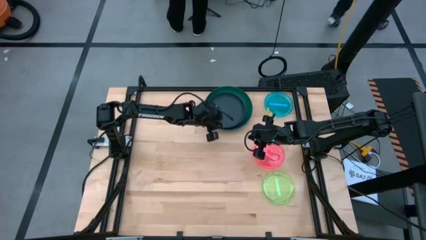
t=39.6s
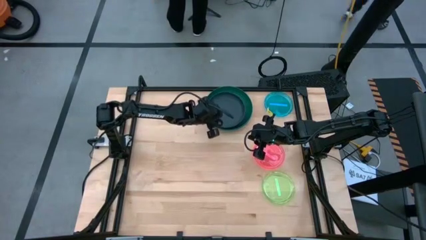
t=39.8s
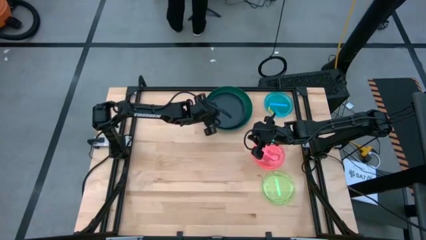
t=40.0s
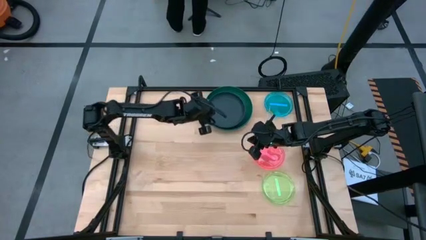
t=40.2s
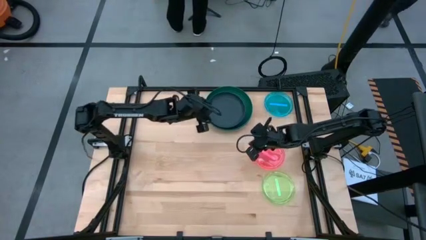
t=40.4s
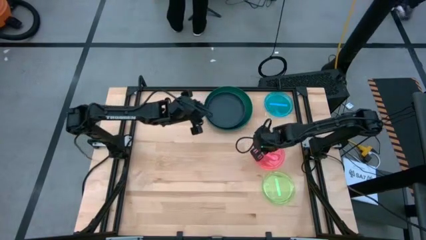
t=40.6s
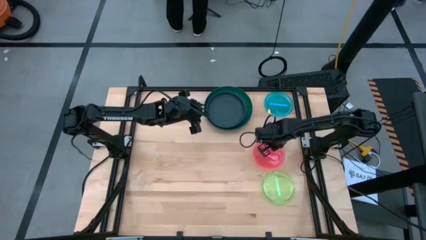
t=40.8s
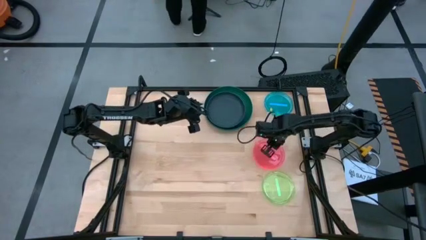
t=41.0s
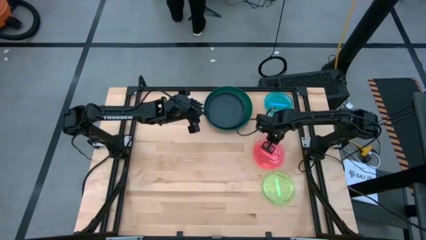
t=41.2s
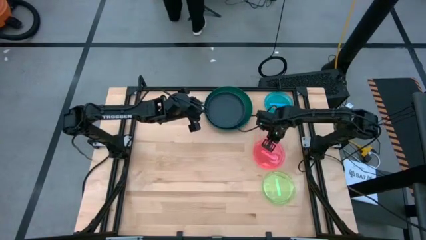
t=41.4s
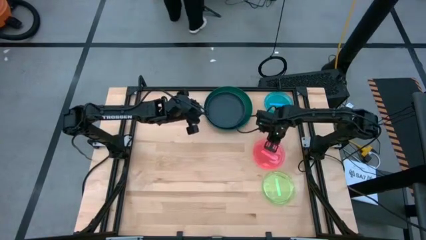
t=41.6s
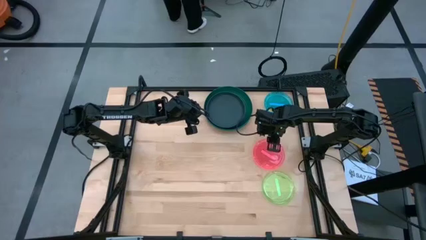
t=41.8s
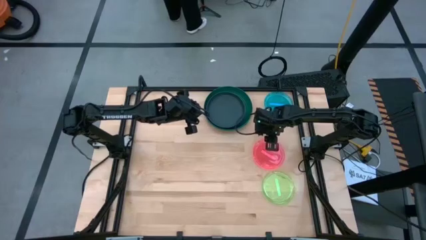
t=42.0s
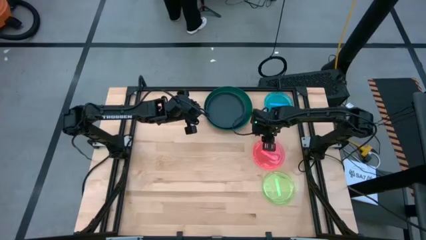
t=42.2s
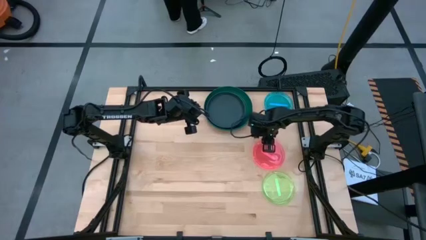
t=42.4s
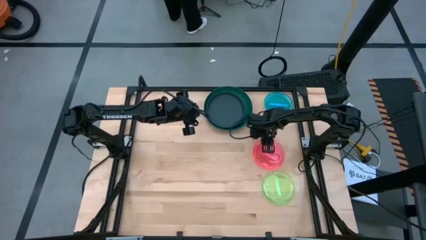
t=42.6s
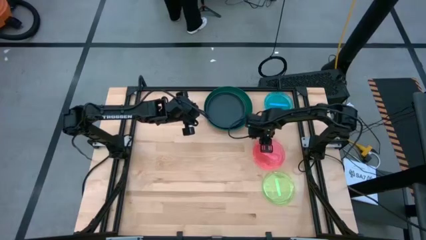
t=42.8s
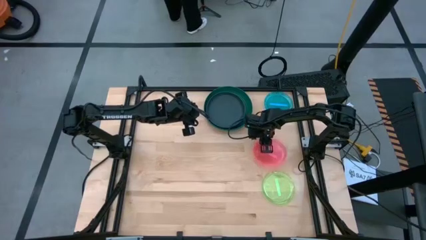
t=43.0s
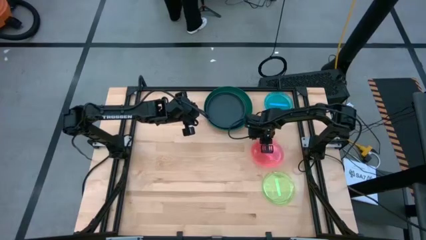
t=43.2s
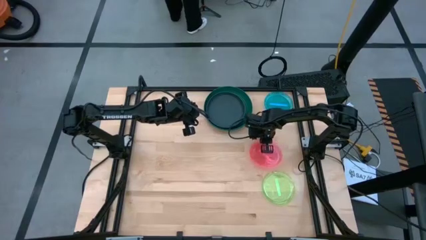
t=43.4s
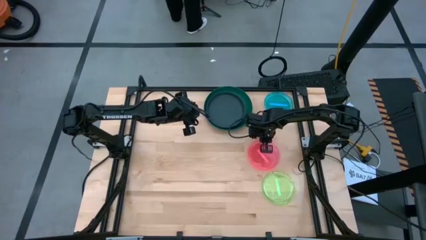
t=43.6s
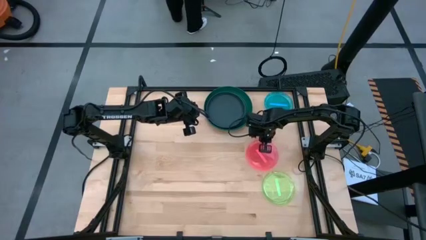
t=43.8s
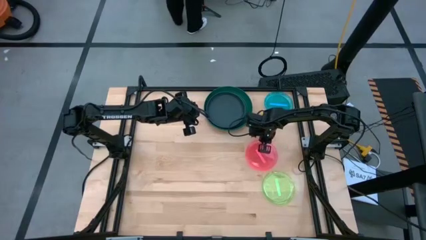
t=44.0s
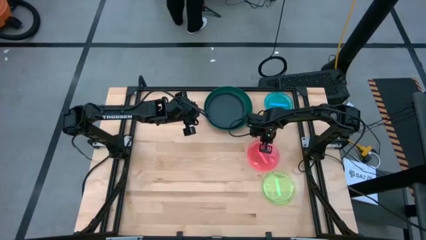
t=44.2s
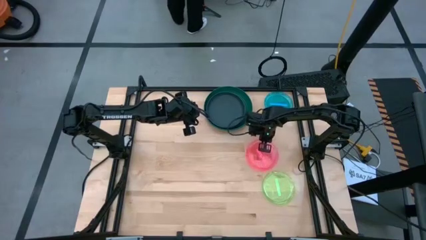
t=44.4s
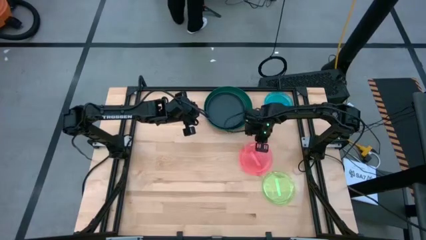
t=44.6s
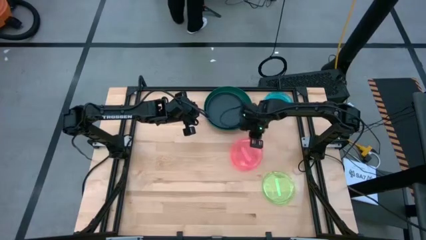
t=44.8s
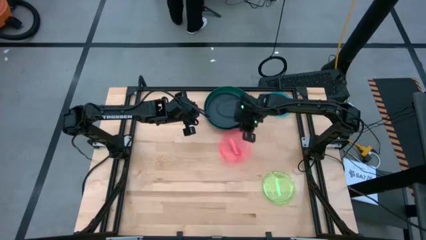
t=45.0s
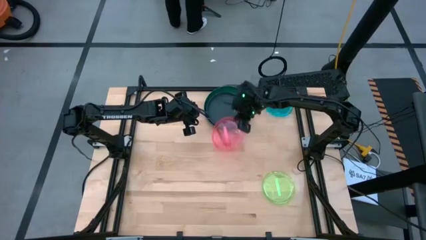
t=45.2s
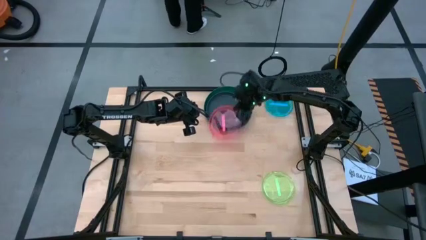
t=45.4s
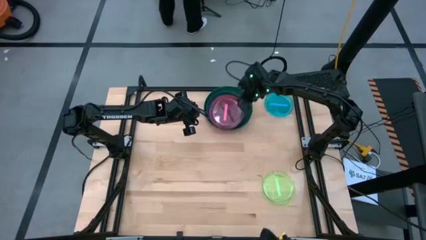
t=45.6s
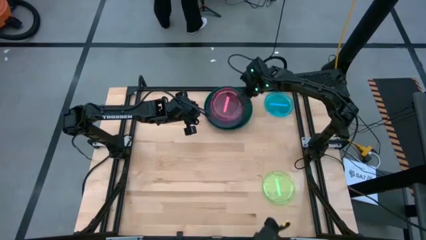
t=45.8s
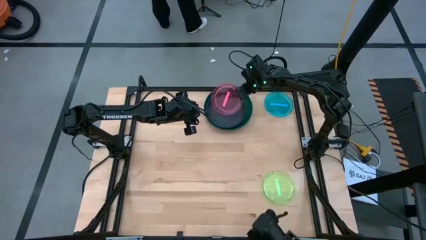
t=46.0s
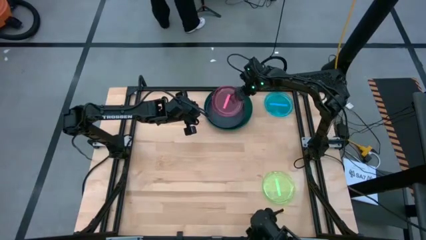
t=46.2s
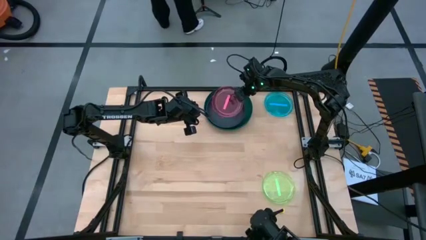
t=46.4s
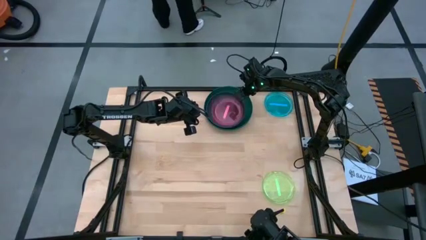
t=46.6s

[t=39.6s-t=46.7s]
Task: Stack plastic plates
Stack the pink plate on top of the blue plate

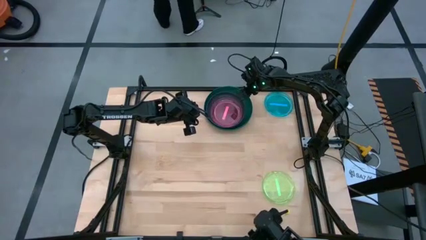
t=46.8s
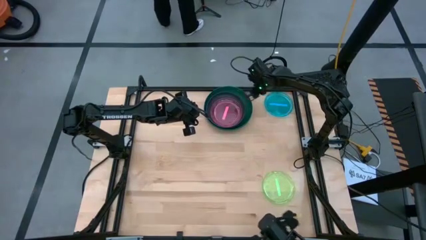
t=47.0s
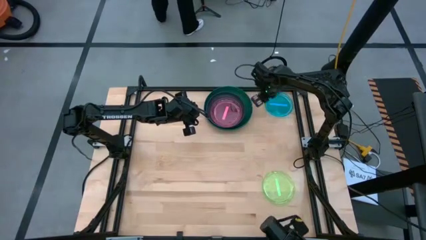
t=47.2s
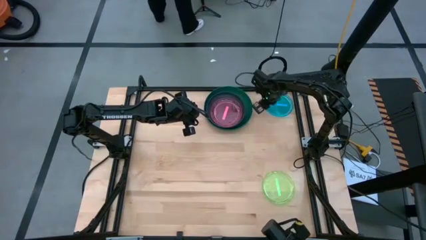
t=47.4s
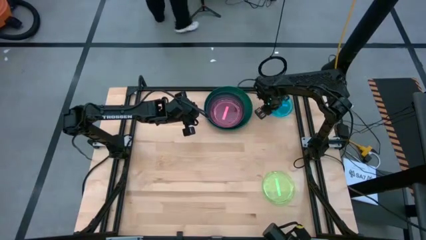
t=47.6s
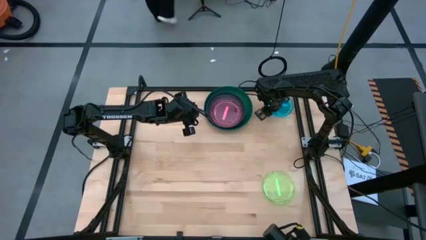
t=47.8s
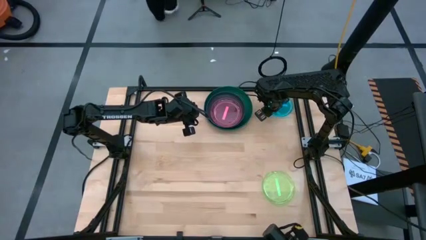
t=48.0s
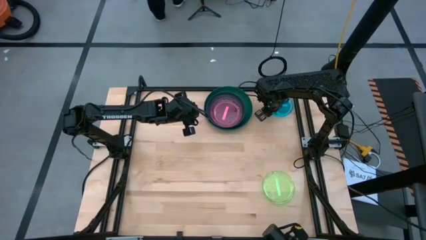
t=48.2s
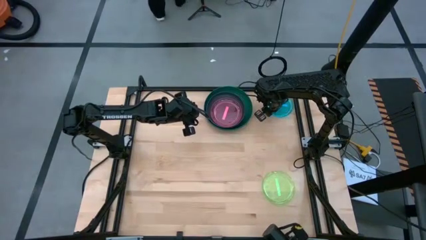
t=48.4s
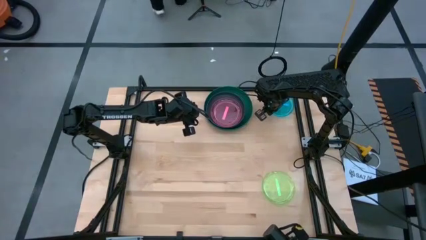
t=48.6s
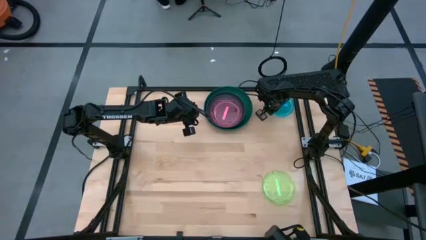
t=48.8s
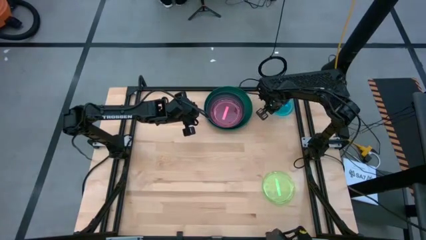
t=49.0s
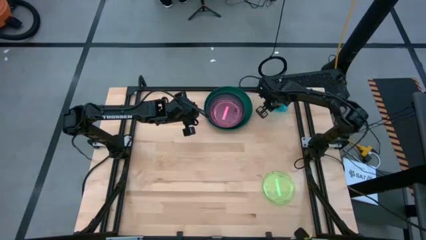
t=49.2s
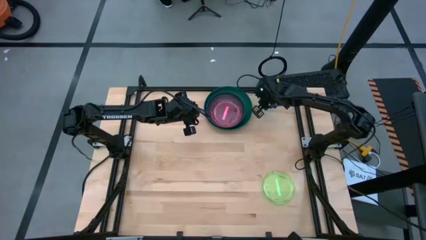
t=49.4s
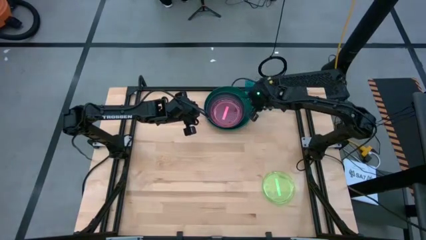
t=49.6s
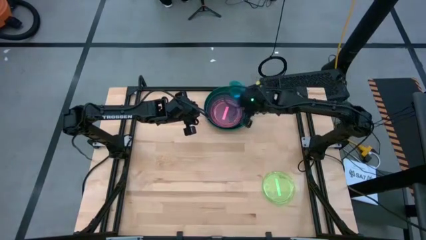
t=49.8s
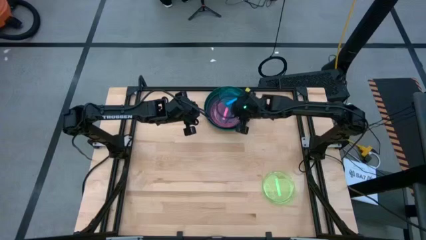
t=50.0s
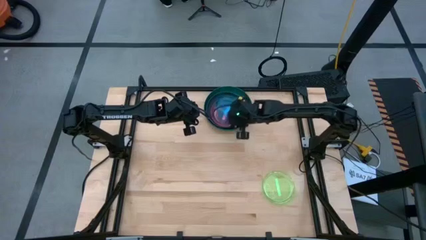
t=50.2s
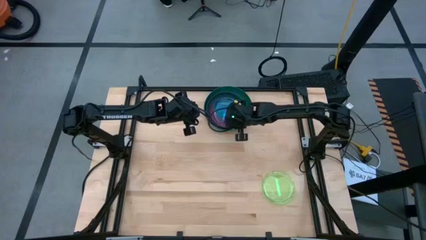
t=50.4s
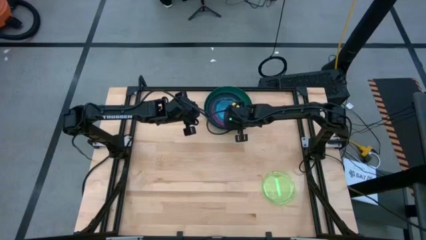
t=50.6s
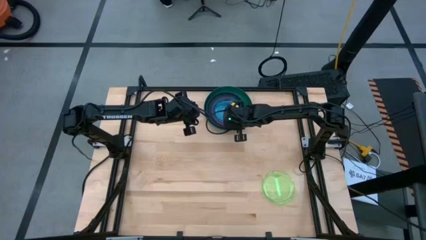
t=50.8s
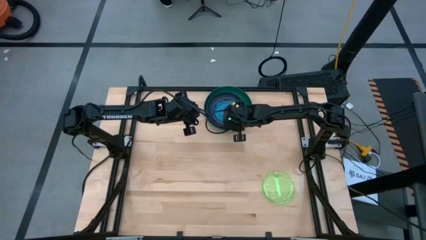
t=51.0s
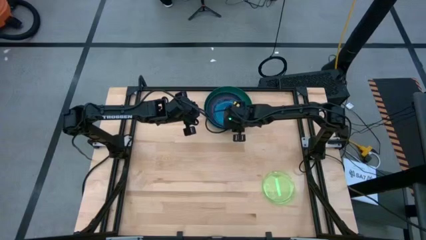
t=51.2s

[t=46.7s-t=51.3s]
Stack the light blue plate on top of the pink plate

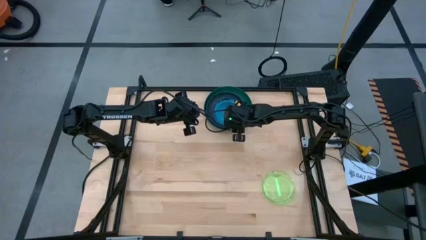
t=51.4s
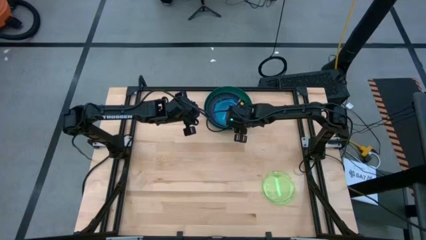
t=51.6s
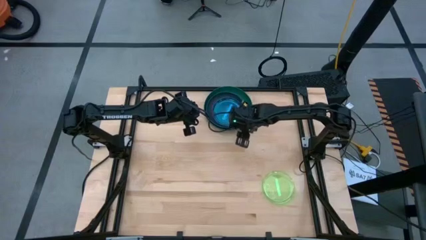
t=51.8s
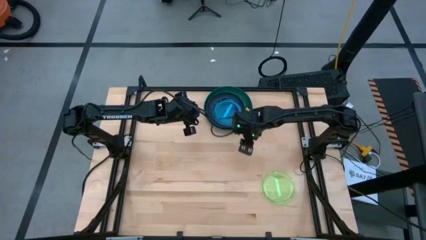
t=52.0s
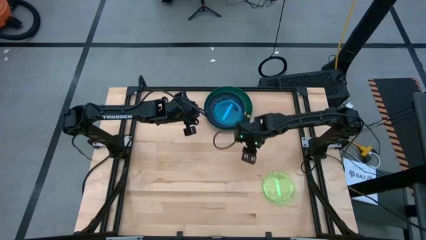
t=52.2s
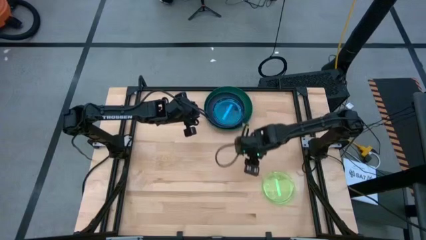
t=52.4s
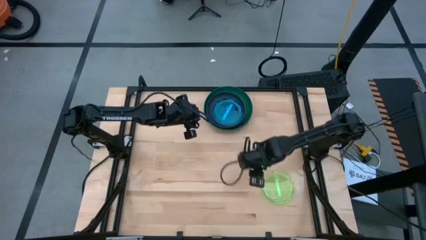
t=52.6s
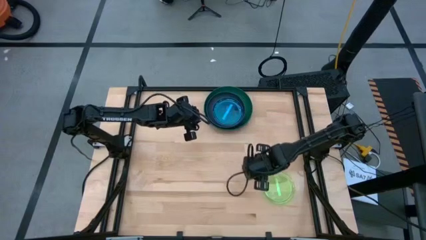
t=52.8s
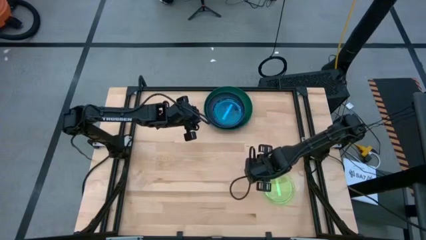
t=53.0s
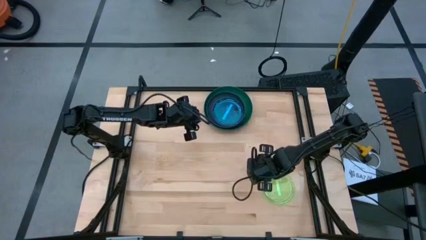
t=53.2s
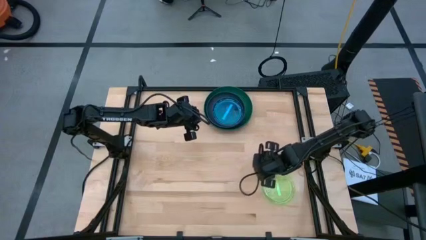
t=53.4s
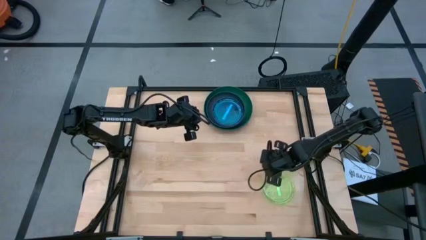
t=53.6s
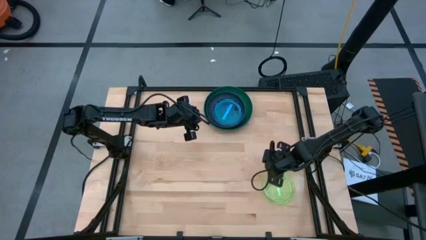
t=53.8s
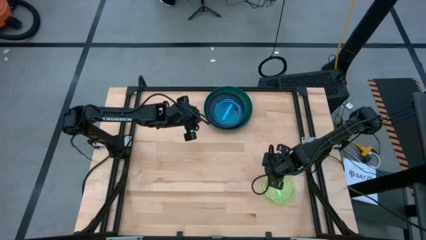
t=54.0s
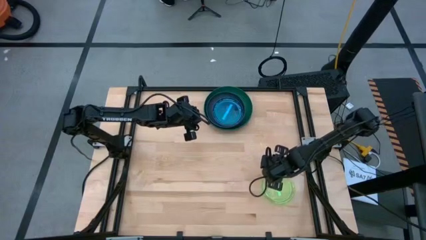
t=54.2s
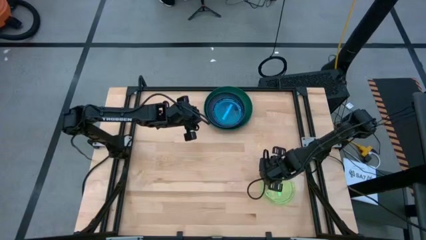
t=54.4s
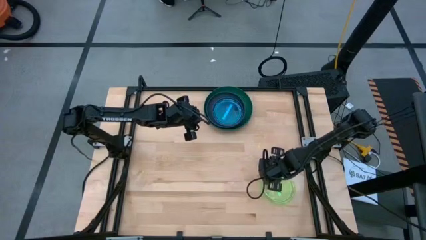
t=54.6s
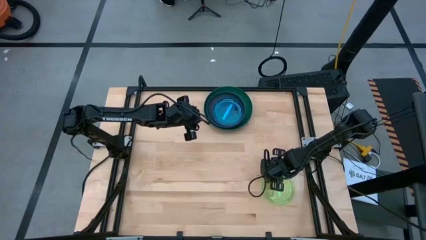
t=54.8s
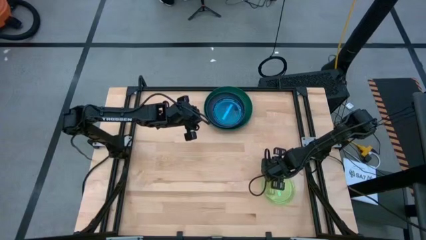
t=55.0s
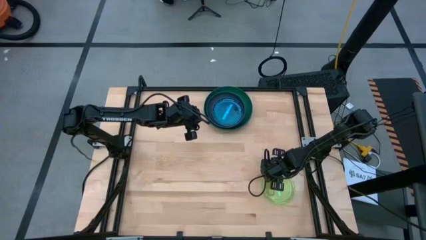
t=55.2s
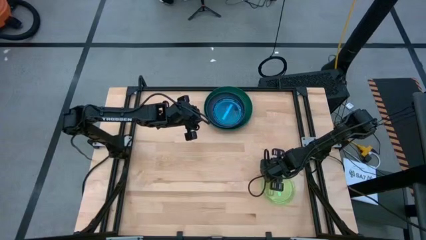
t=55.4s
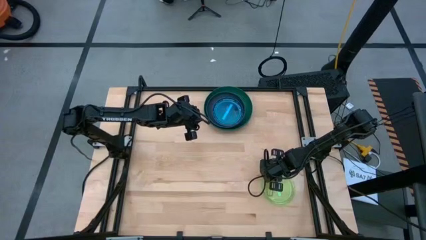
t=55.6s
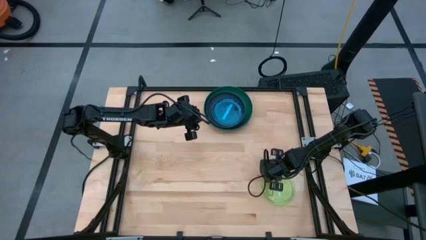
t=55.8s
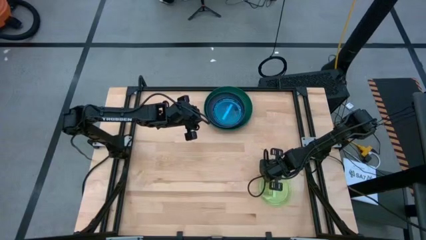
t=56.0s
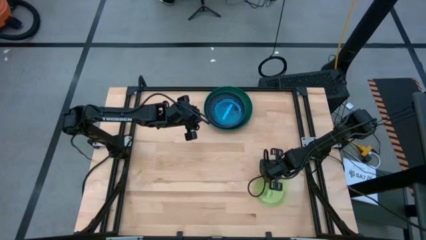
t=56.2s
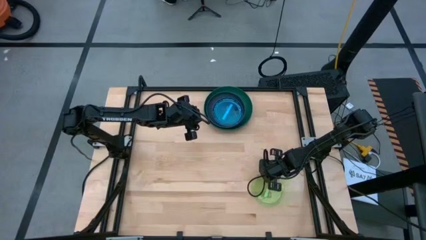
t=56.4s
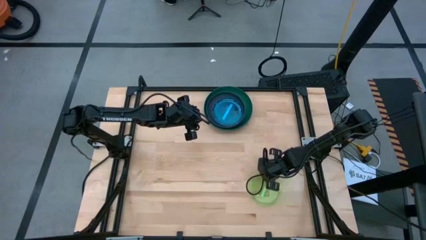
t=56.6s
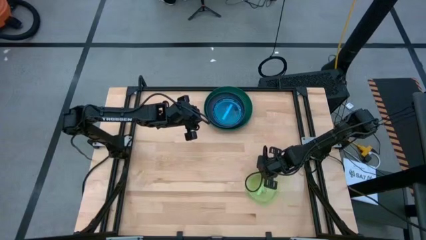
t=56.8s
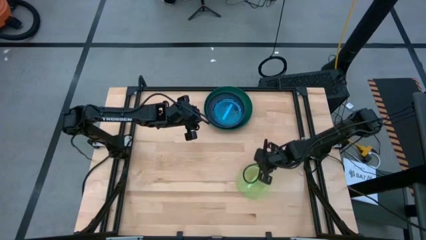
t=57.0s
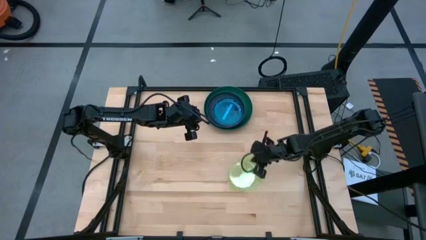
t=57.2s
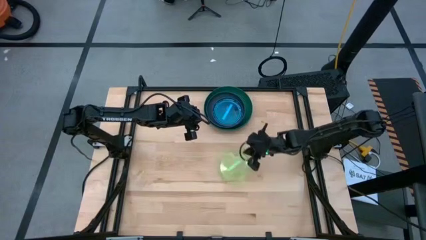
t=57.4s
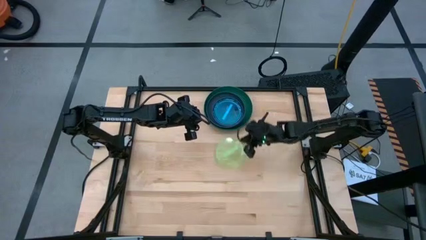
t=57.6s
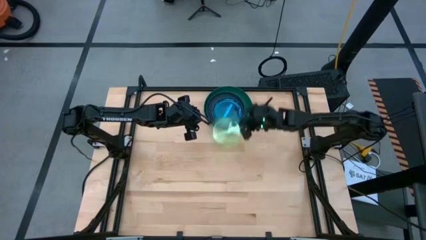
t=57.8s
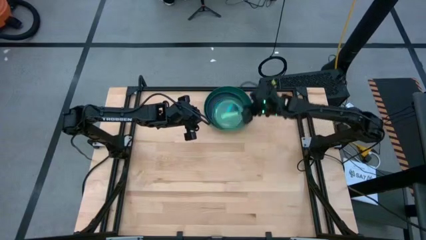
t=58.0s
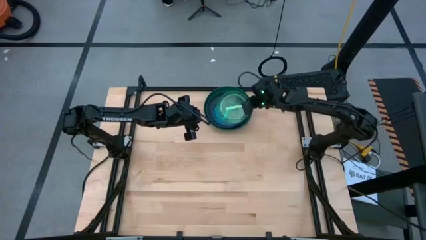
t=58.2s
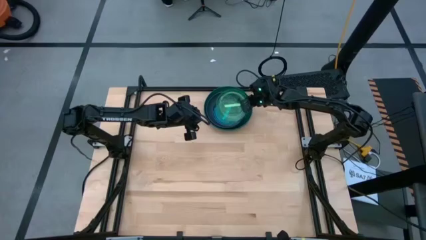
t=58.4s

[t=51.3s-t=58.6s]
Stack the light green plate on top of the light blue plate
